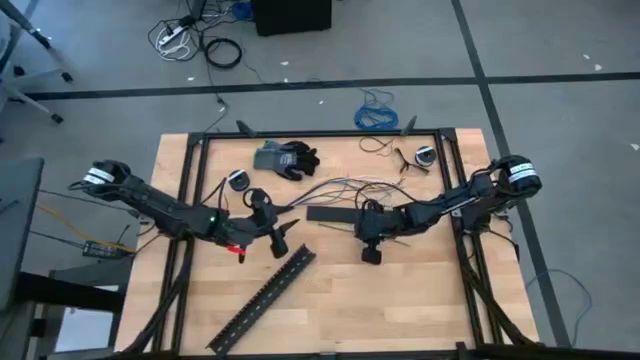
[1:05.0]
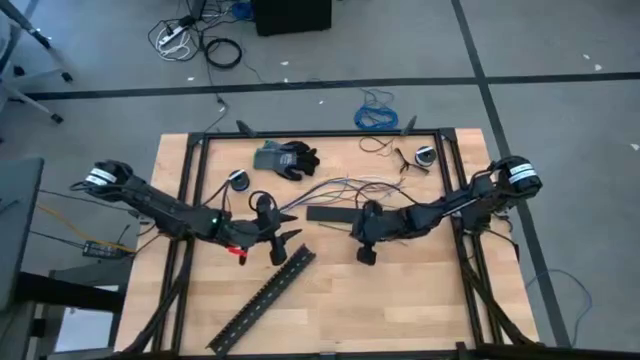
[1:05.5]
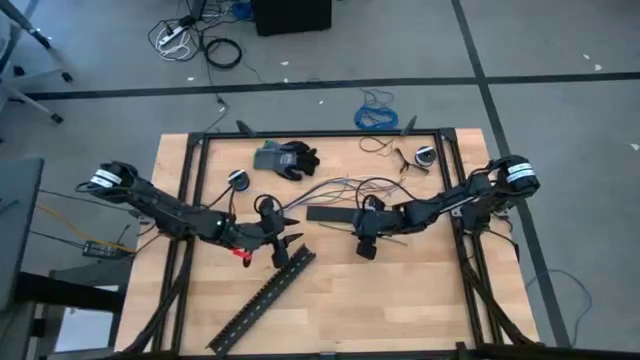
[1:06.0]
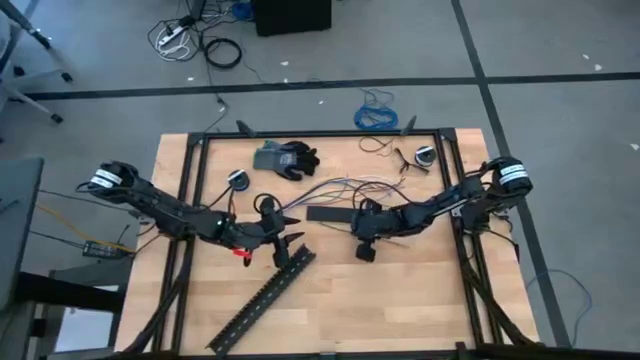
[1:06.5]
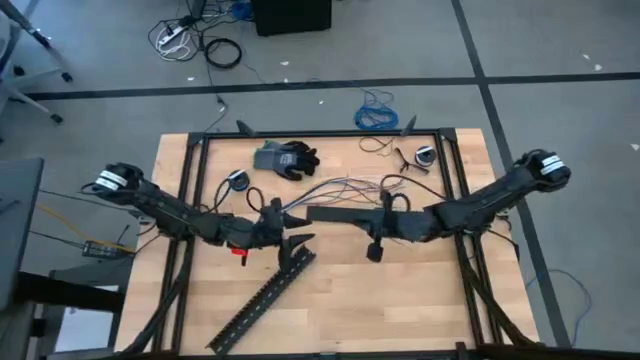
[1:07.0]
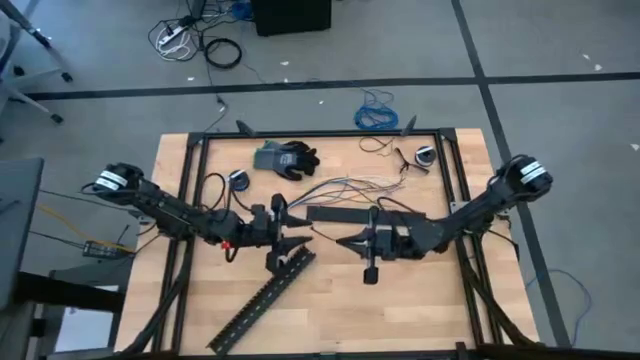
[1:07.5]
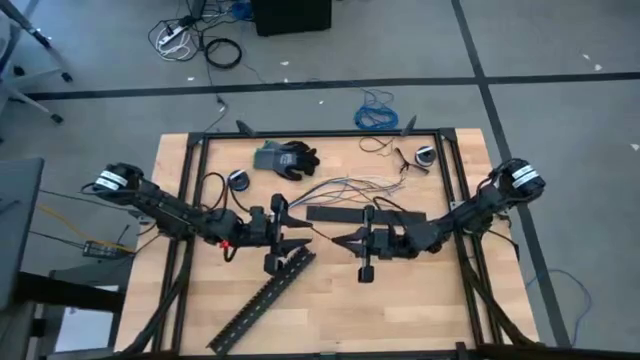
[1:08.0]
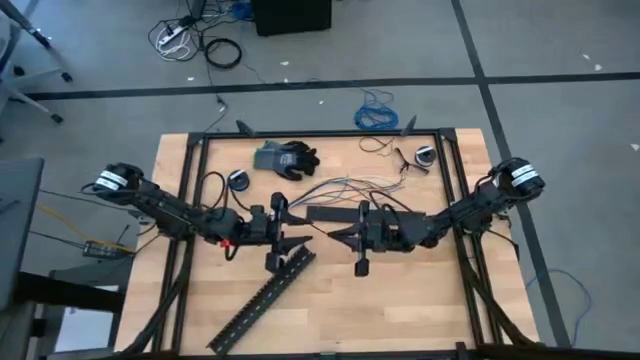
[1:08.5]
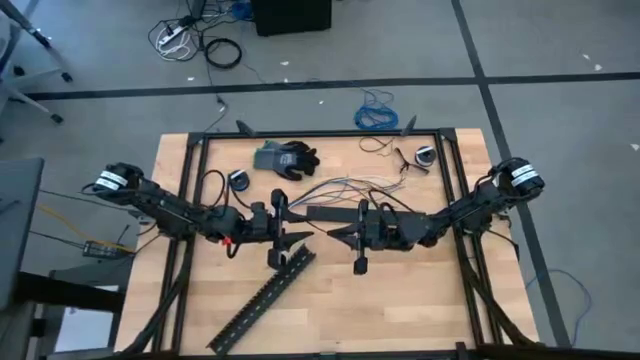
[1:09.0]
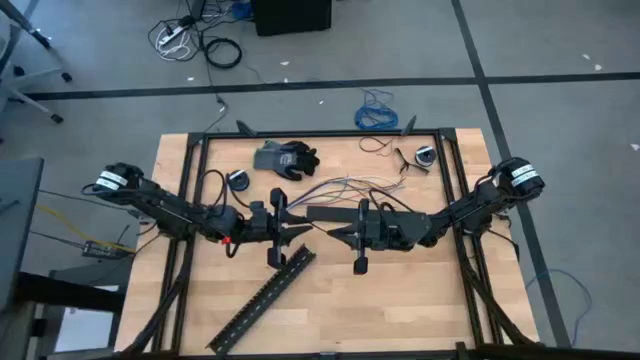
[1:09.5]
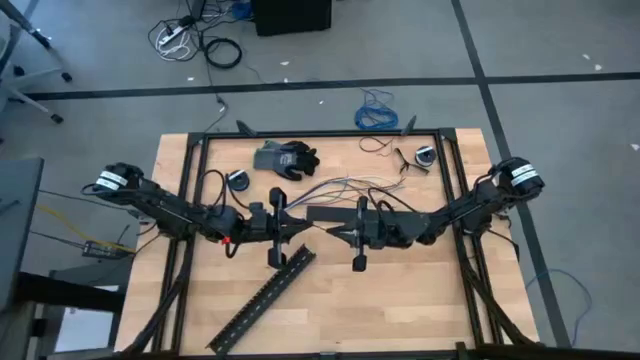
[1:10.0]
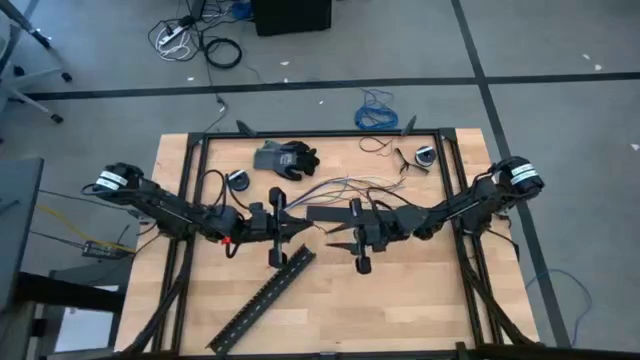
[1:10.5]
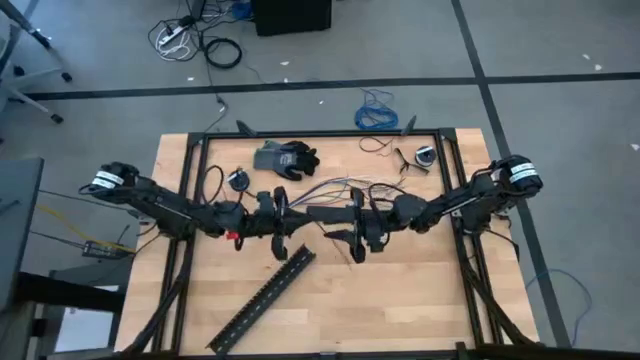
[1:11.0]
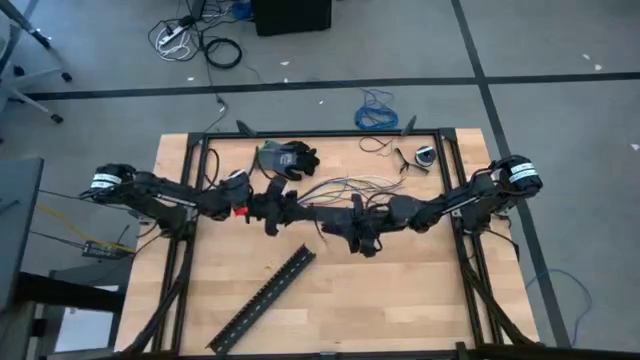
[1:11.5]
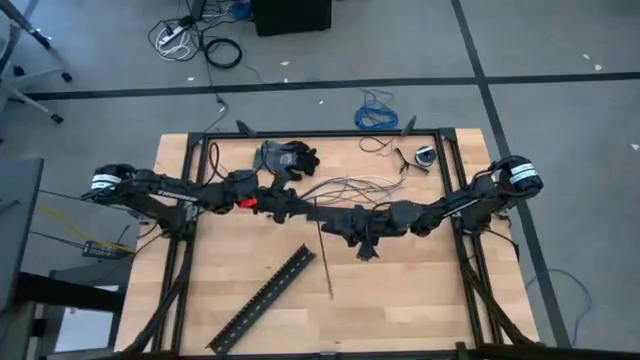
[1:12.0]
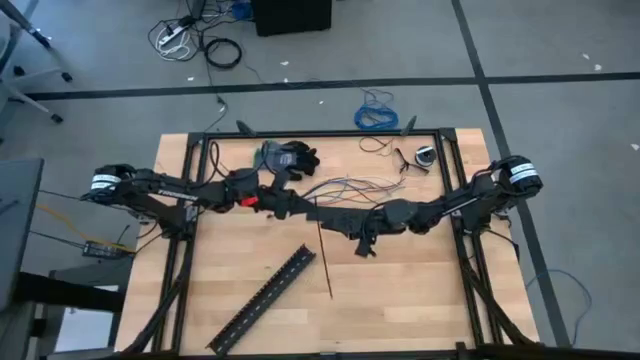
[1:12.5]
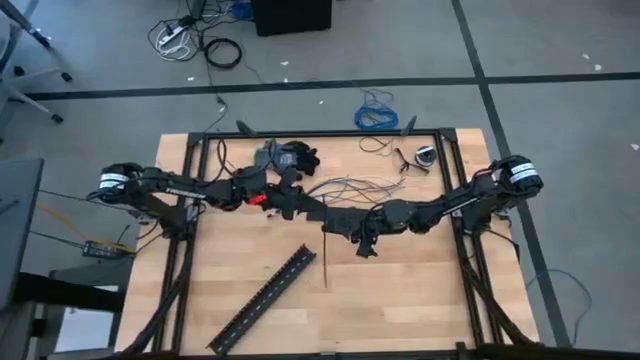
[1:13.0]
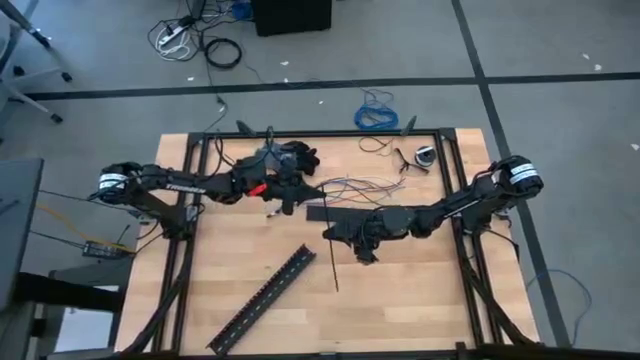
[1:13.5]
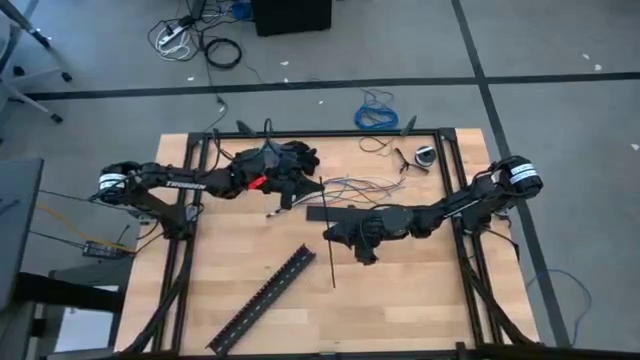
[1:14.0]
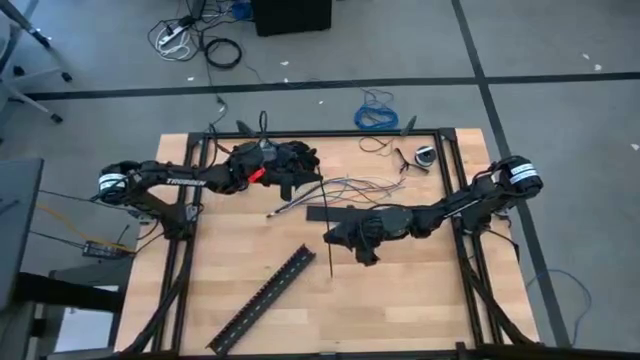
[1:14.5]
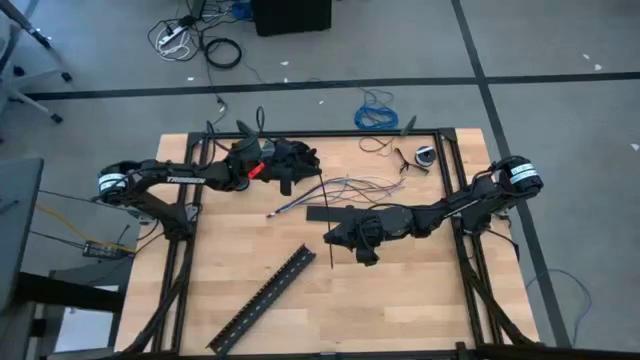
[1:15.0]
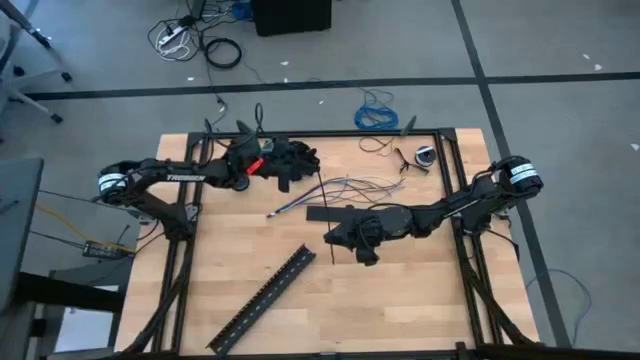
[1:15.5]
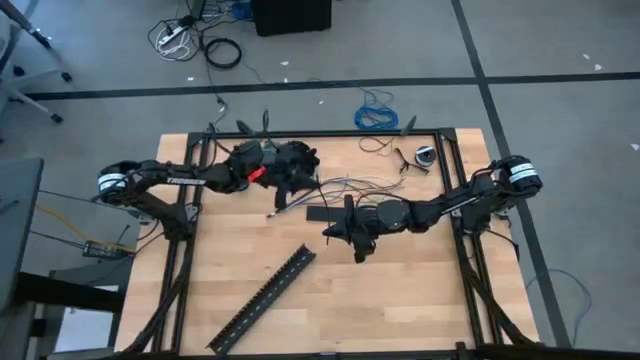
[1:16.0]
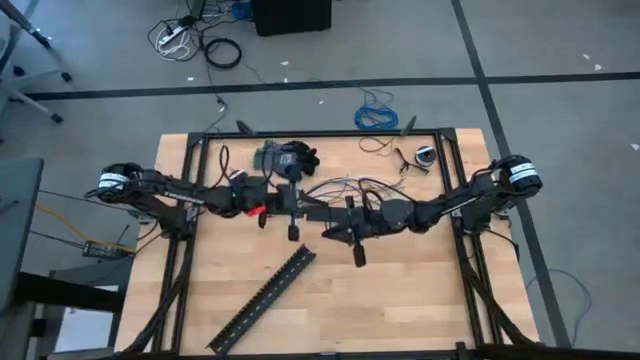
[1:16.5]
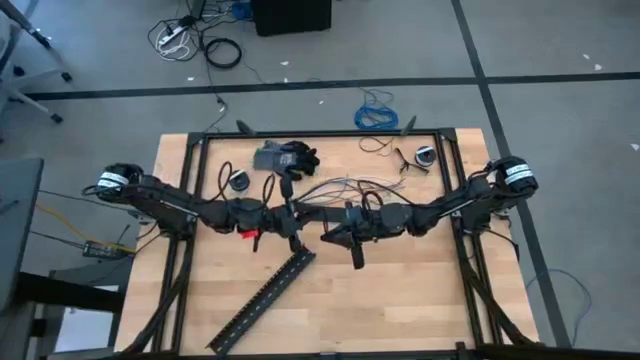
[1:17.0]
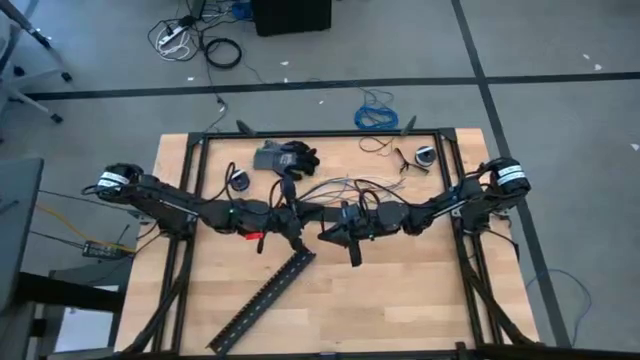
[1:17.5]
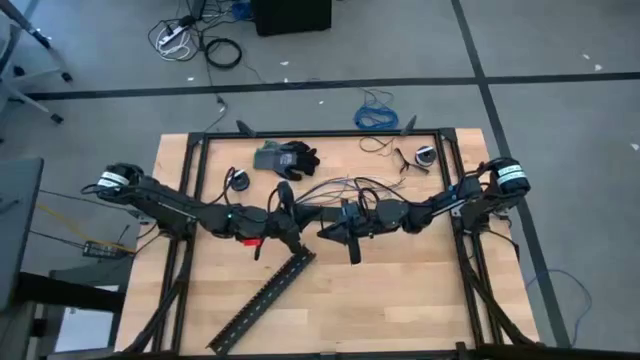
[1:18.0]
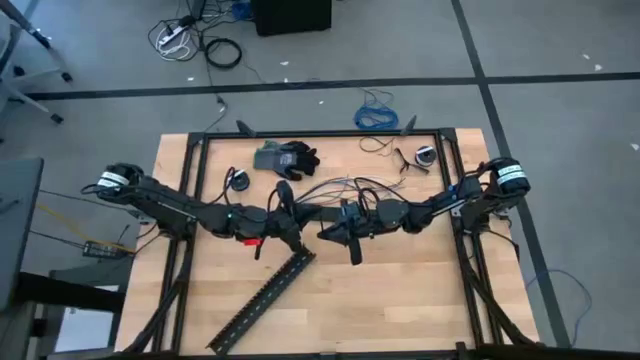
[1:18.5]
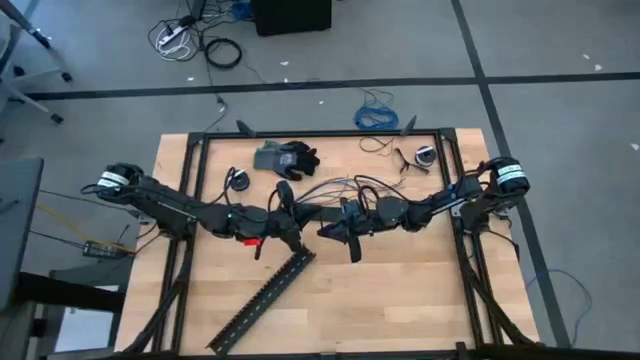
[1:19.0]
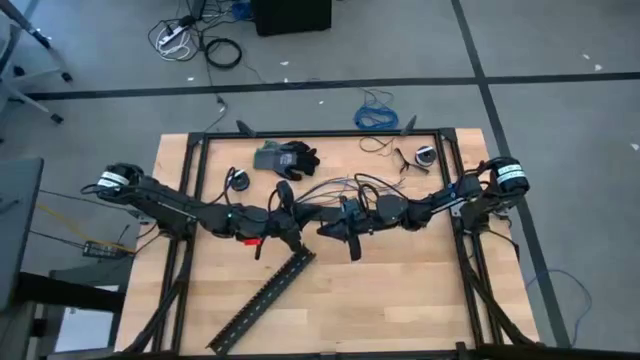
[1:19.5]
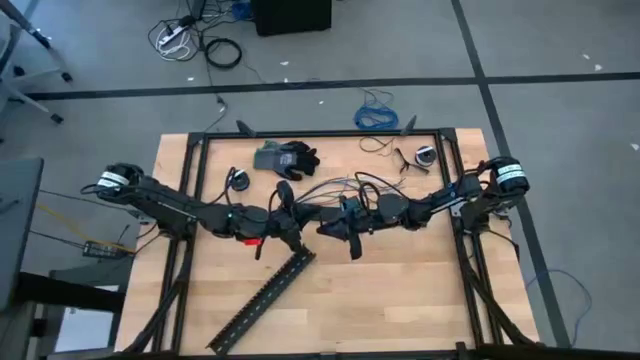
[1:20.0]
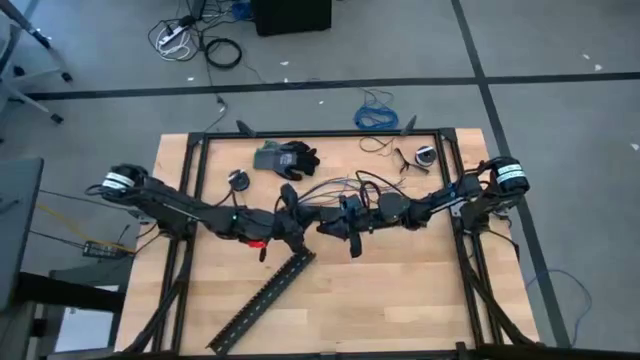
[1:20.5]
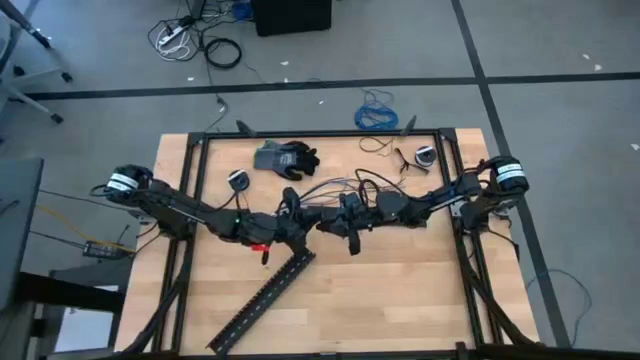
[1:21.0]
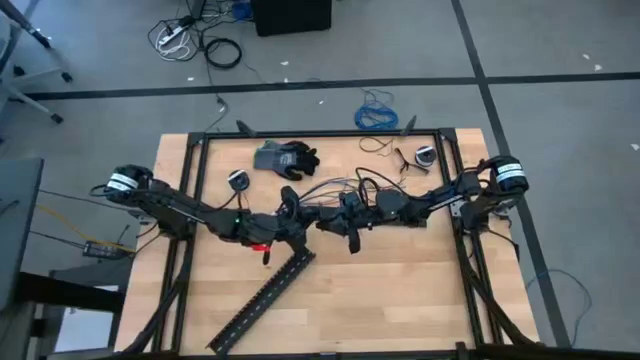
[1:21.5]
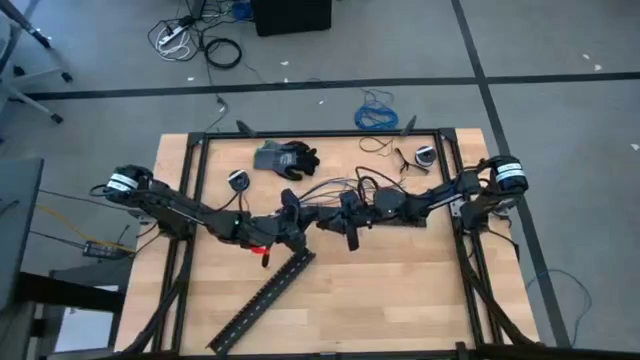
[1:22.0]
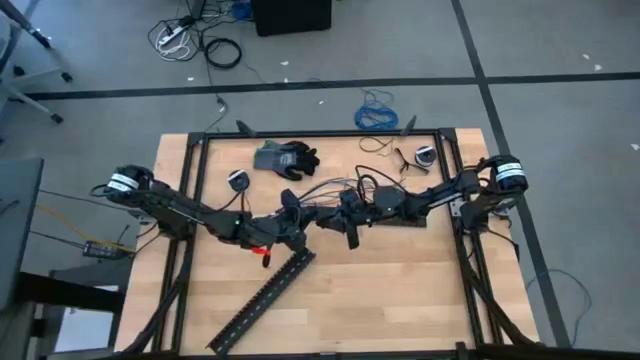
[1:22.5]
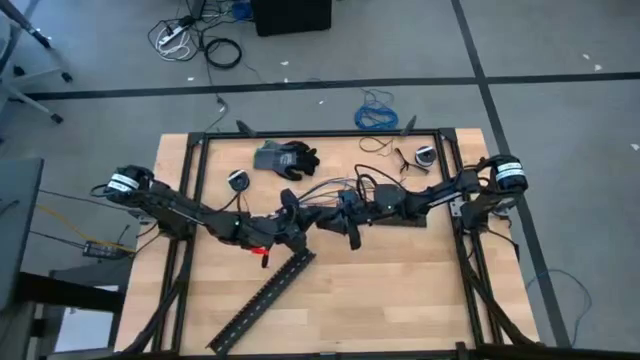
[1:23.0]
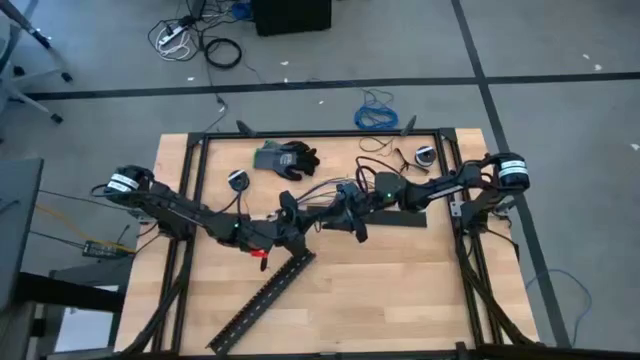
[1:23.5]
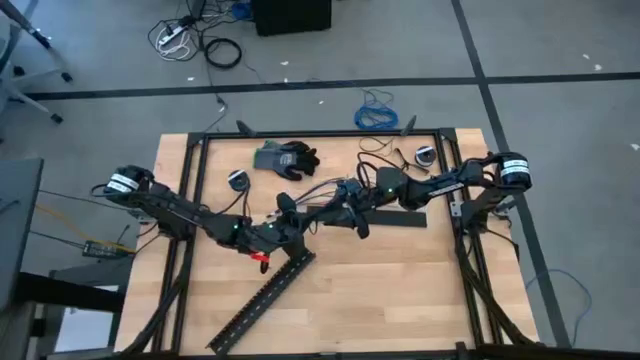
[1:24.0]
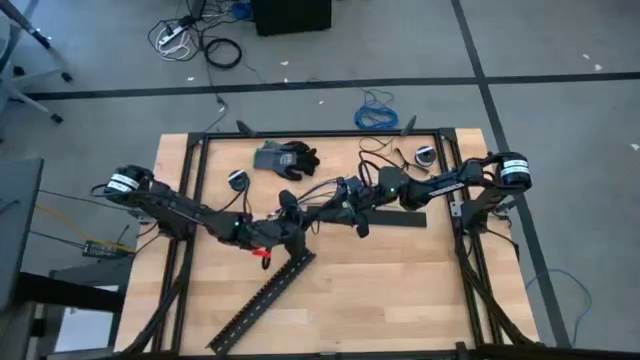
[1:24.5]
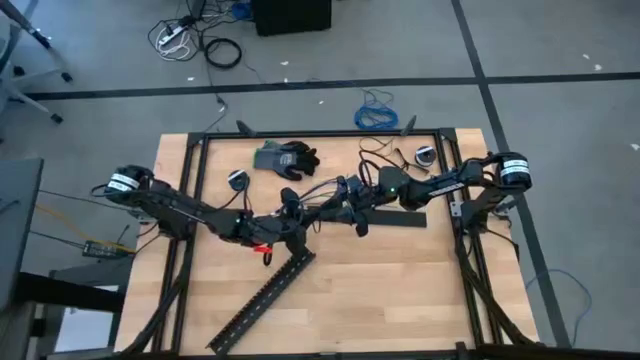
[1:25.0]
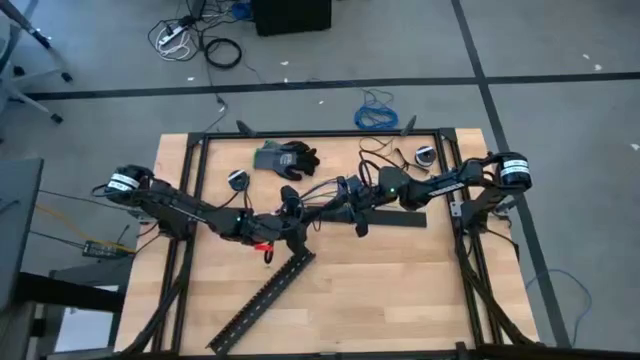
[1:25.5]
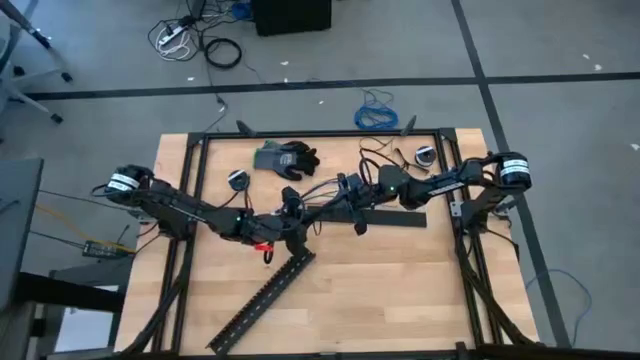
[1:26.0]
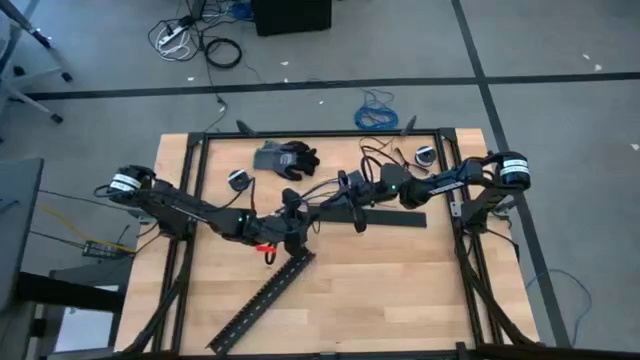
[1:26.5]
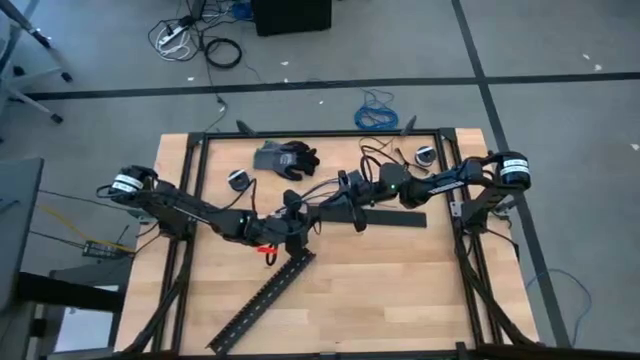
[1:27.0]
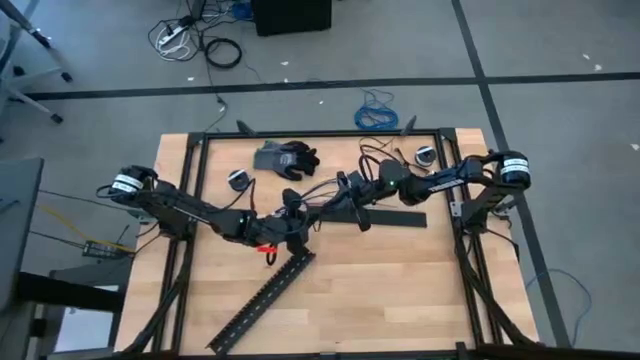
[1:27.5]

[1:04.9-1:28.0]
Task: Ziptie cables
Wrap the cable wires with the black zip tie
